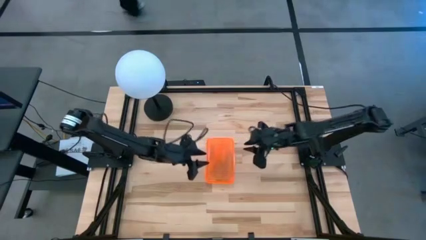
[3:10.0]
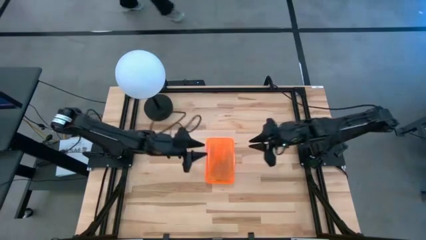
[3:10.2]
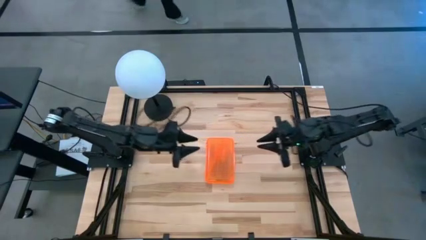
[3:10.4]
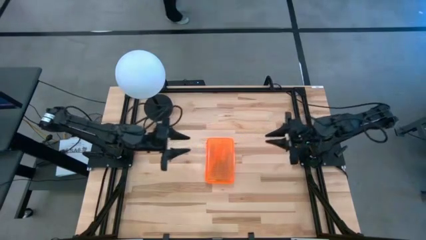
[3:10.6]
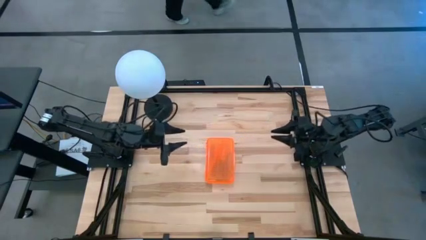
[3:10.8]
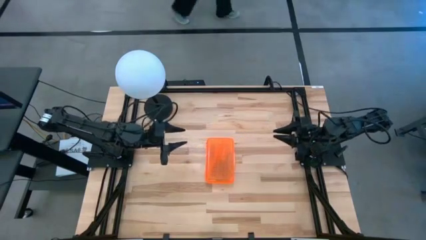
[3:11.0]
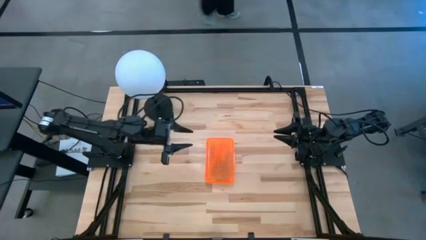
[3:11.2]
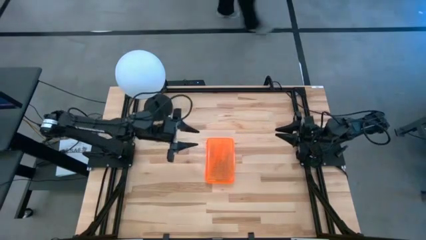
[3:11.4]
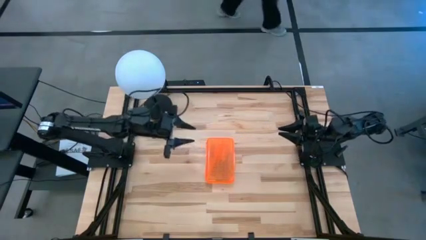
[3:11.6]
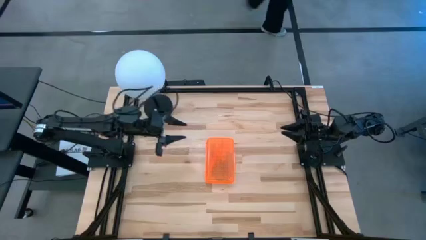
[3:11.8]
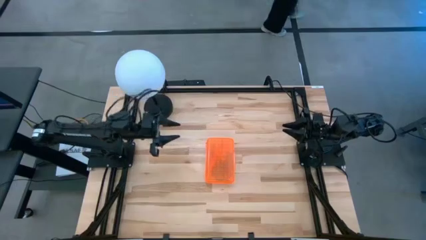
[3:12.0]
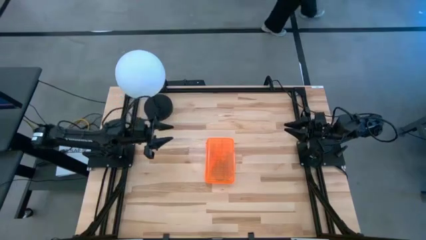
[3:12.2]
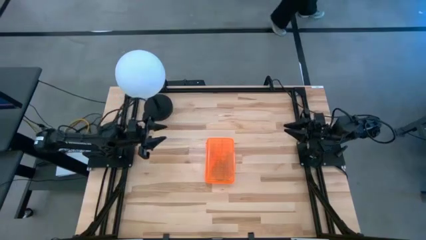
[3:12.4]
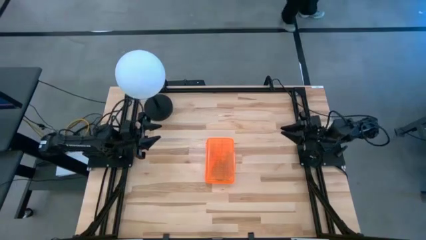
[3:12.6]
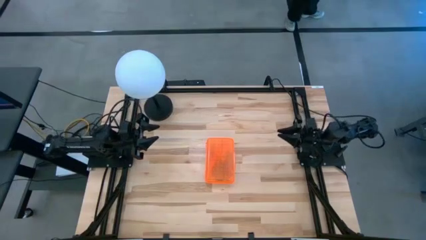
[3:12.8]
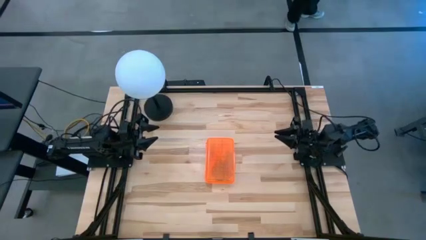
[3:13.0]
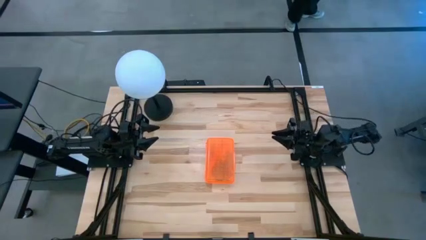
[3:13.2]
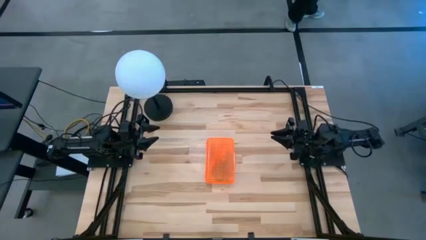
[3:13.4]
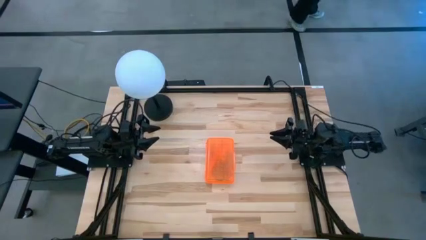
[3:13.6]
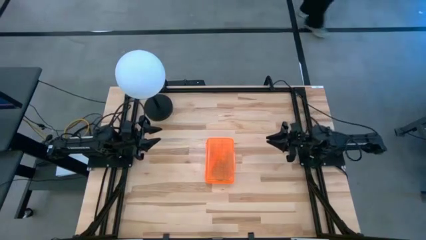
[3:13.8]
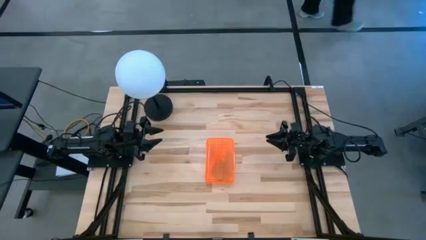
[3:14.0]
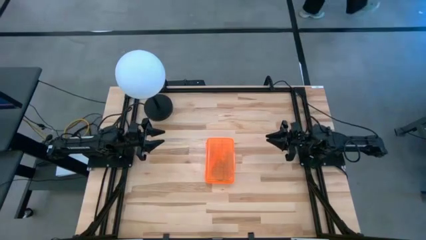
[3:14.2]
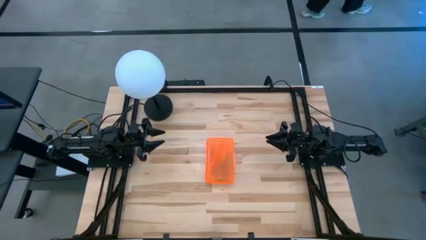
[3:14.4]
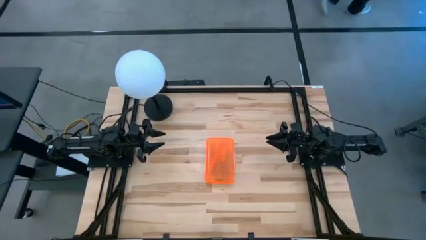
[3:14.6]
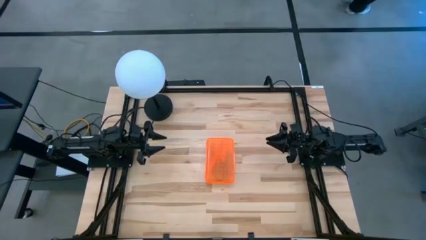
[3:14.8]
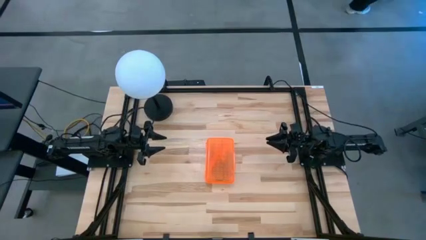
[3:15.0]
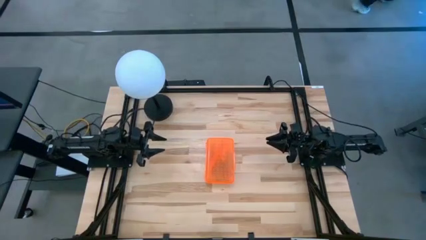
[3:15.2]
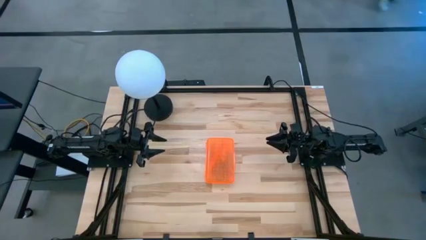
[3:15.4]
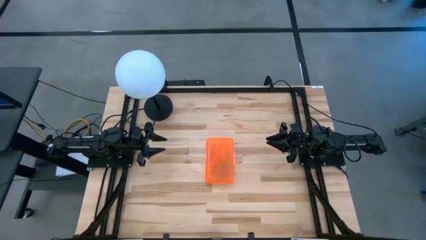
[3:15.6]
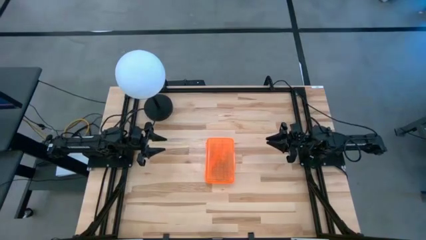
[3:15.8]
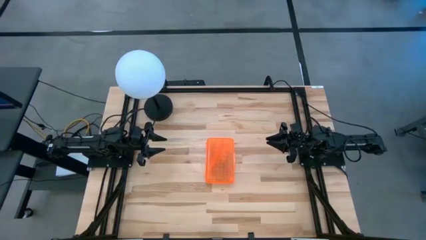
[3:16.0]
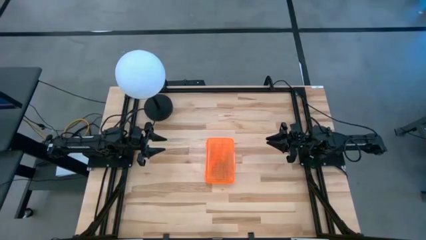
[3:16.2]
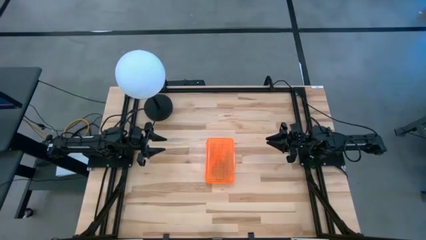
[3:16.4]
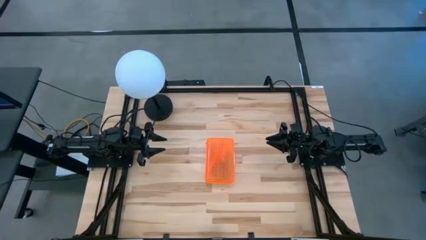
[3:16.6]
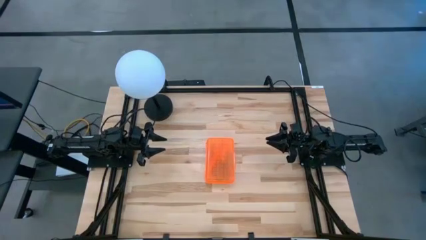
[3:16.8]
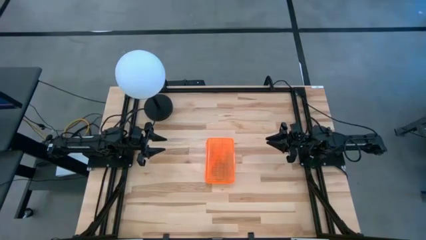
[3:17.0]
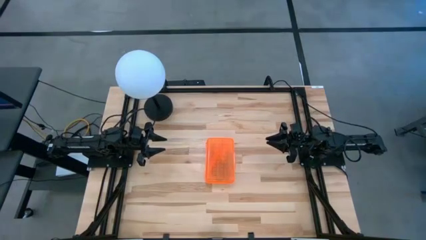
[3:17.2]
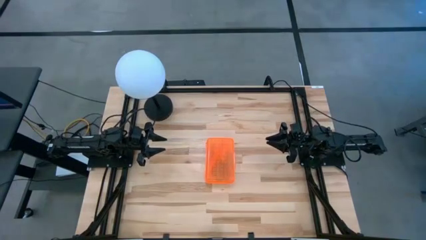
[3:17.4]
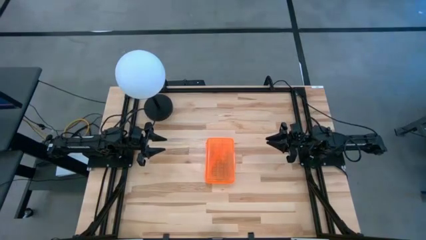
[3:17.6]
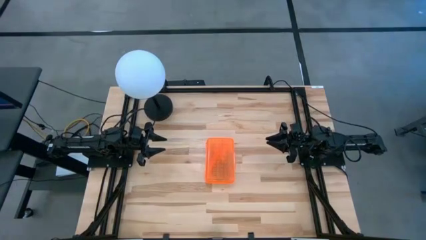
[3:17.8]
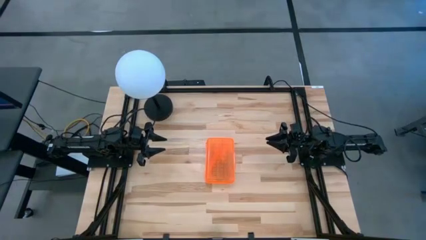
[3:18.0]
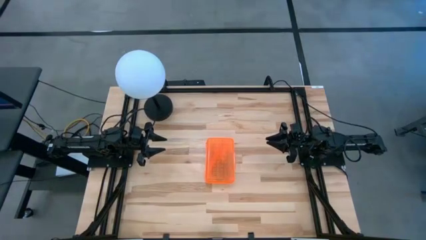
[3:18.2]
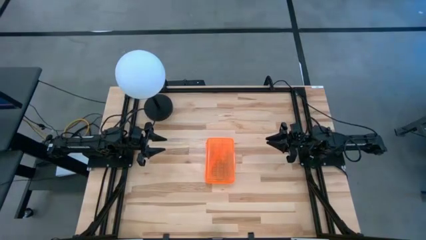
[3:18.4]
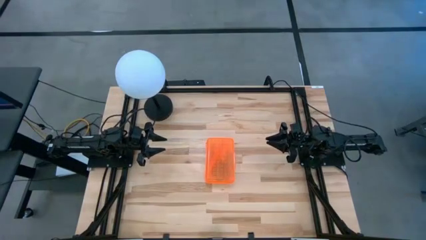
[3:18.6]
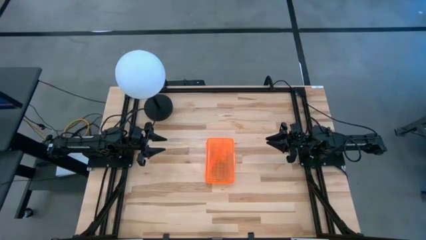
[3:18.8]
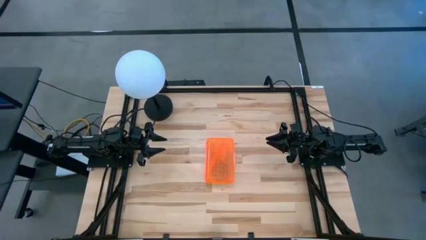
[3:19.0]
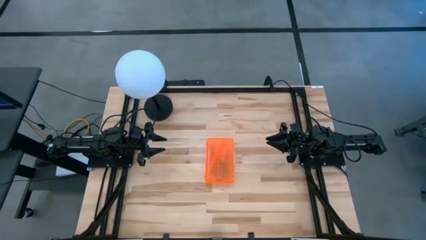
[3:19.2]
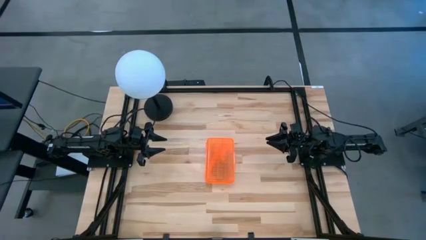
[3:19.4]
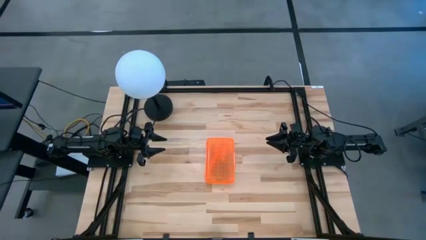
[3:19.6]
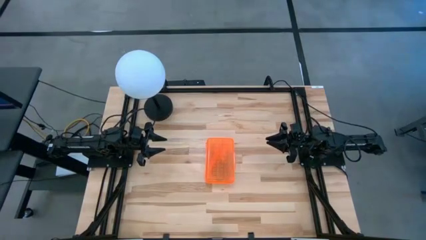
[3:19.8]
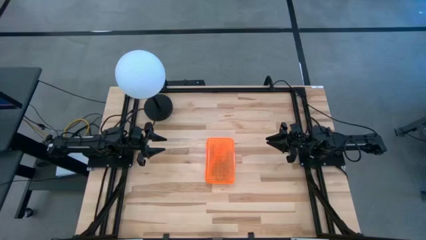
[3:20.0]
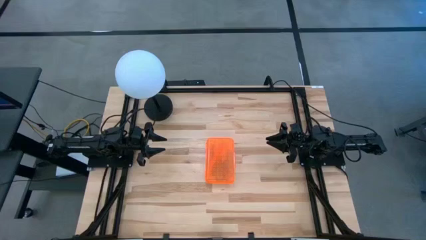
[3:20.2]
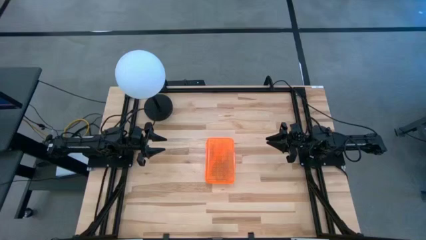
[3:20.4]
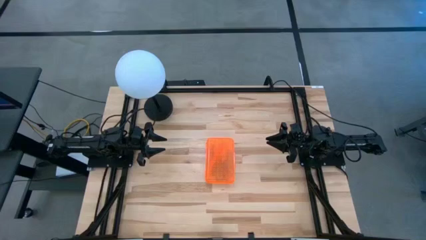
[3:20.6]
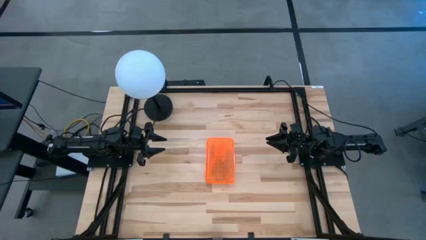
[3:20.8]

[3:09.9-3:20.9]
Task: Pick & place school supplies into a supply box
Return to Home Position
